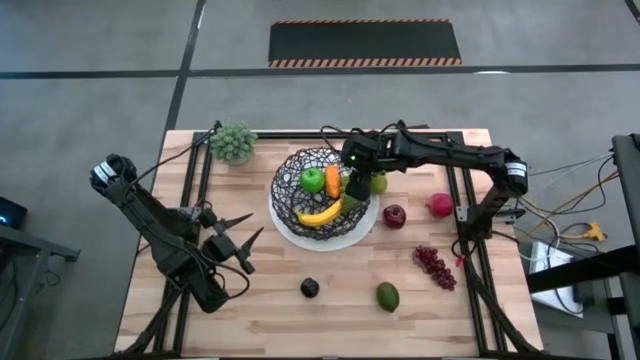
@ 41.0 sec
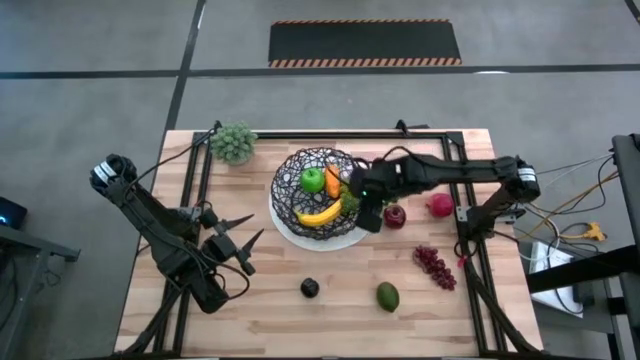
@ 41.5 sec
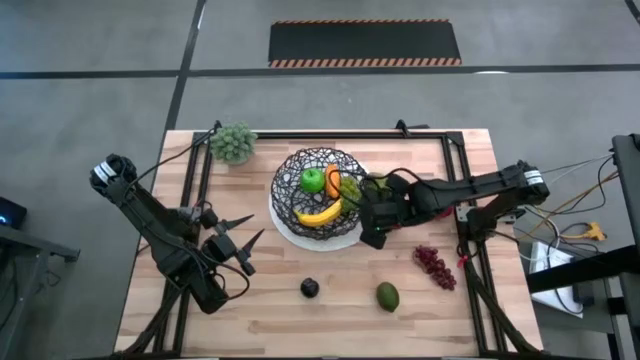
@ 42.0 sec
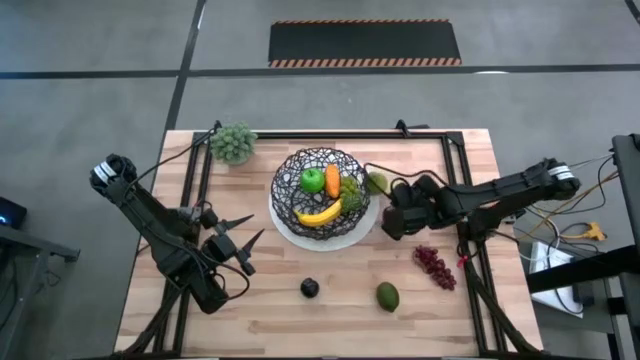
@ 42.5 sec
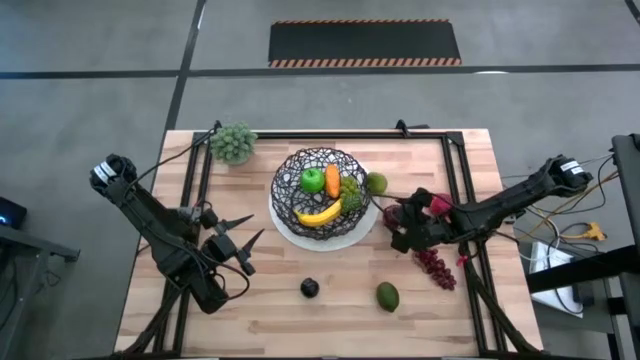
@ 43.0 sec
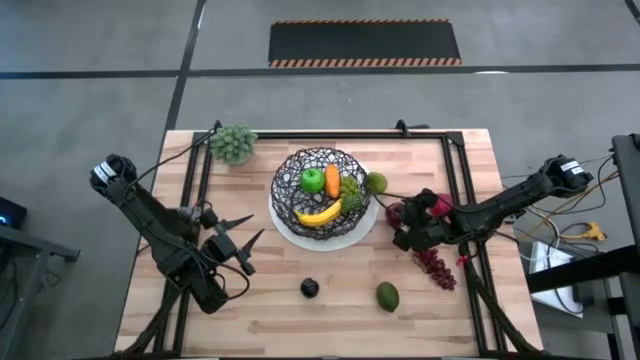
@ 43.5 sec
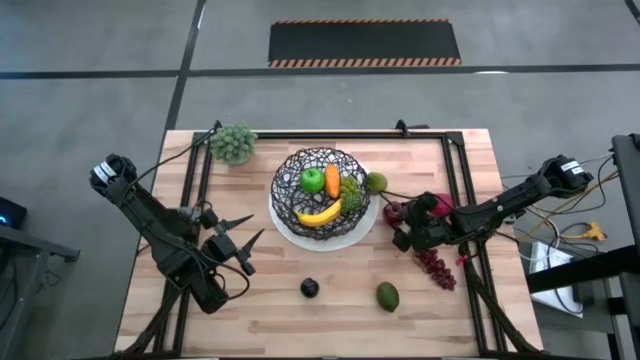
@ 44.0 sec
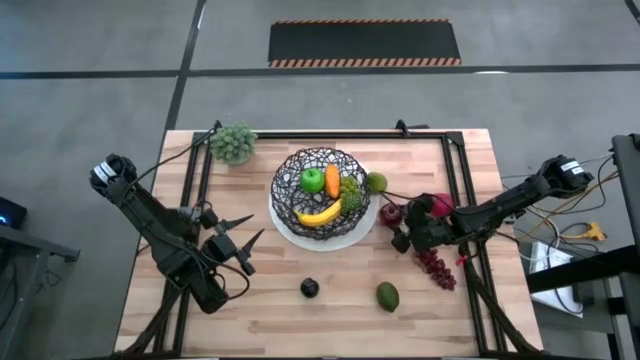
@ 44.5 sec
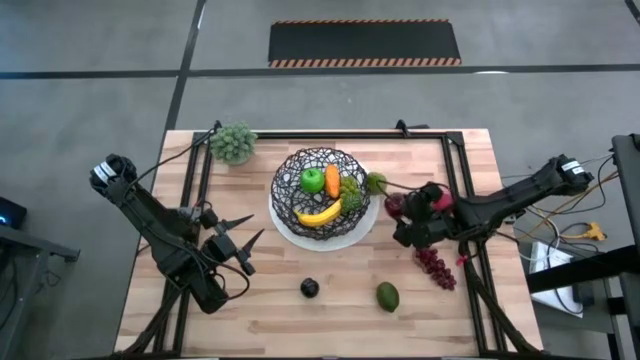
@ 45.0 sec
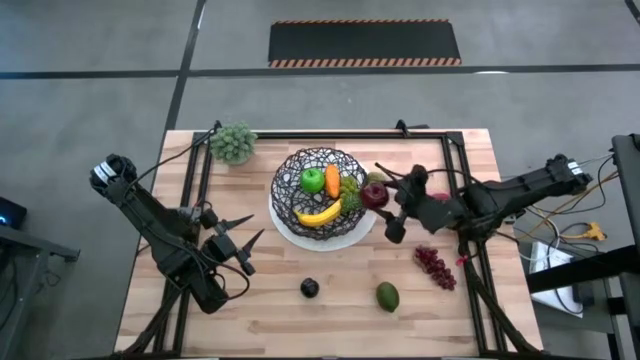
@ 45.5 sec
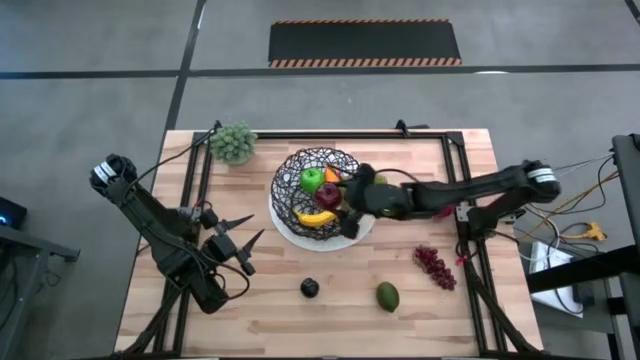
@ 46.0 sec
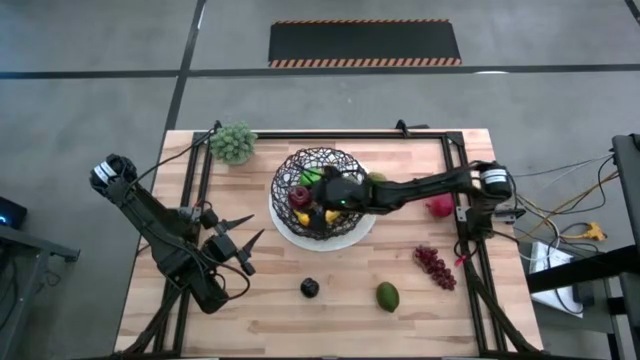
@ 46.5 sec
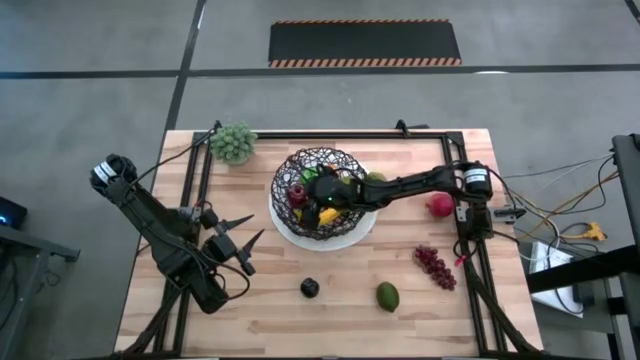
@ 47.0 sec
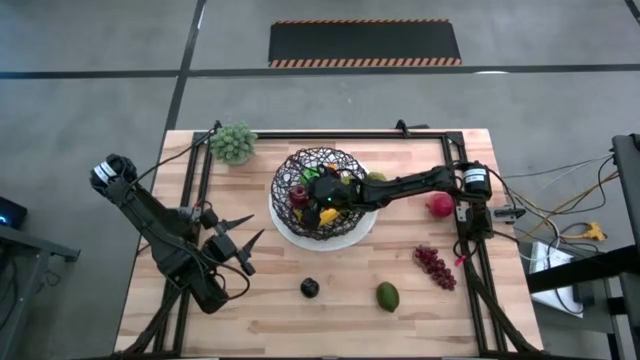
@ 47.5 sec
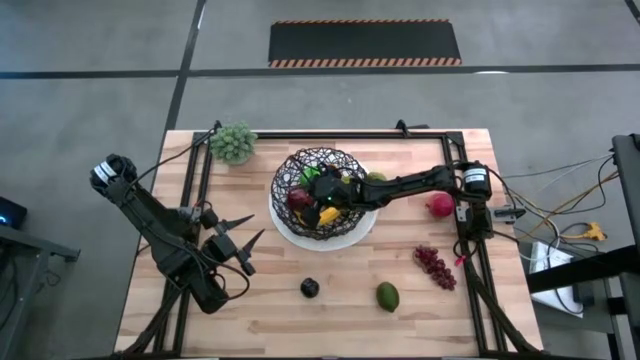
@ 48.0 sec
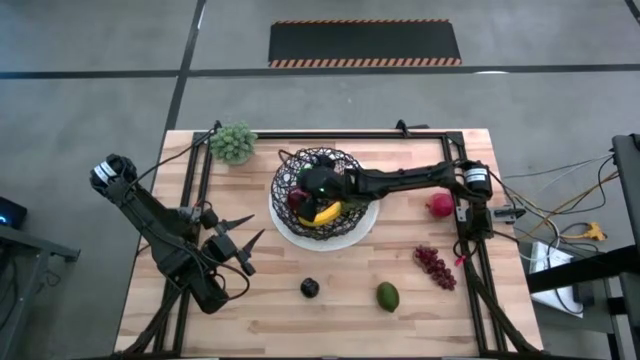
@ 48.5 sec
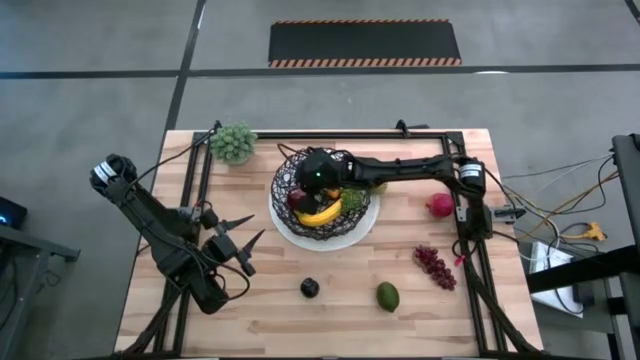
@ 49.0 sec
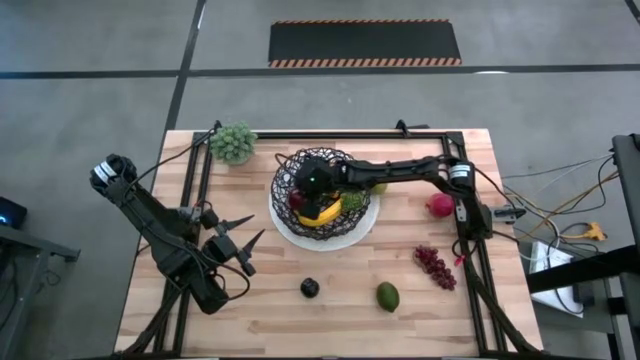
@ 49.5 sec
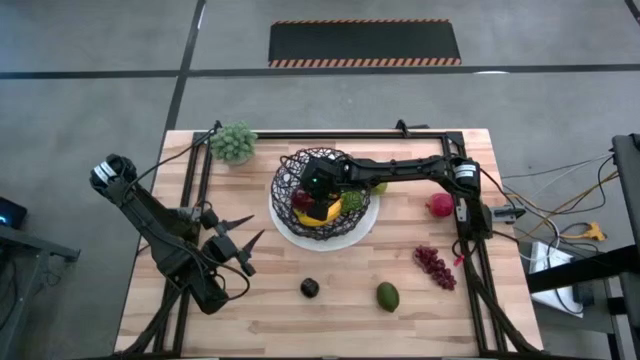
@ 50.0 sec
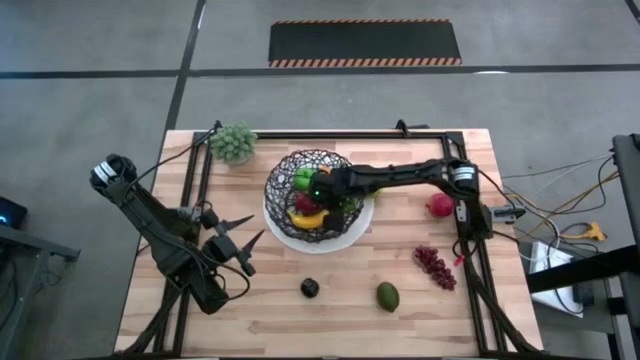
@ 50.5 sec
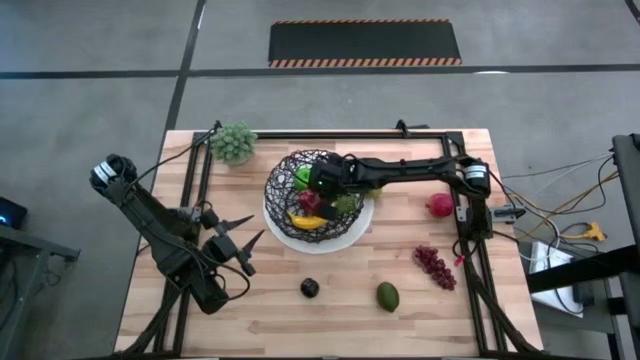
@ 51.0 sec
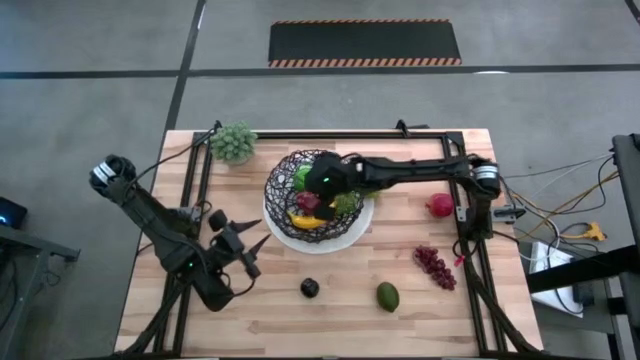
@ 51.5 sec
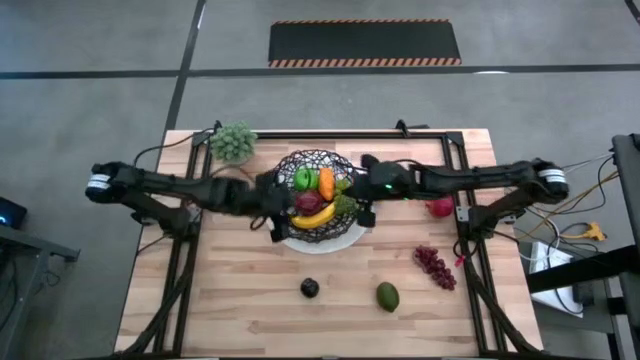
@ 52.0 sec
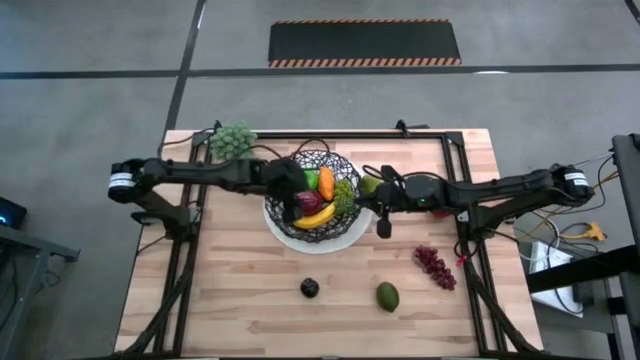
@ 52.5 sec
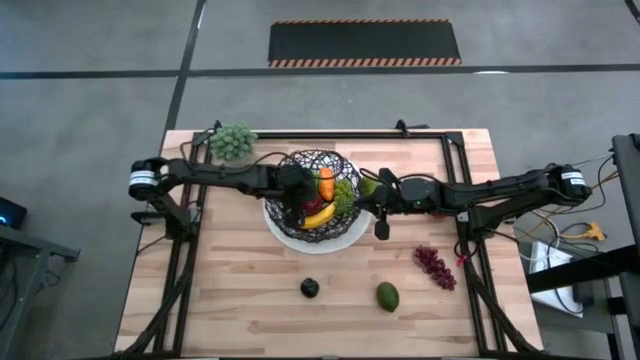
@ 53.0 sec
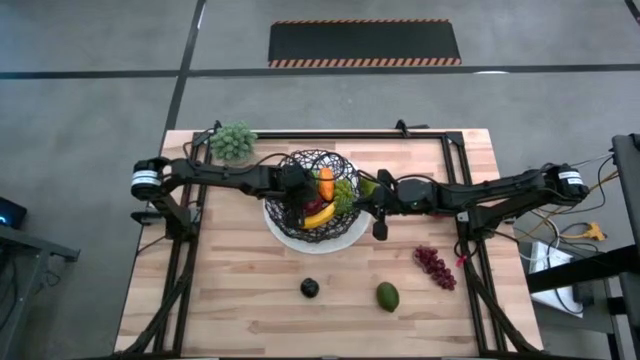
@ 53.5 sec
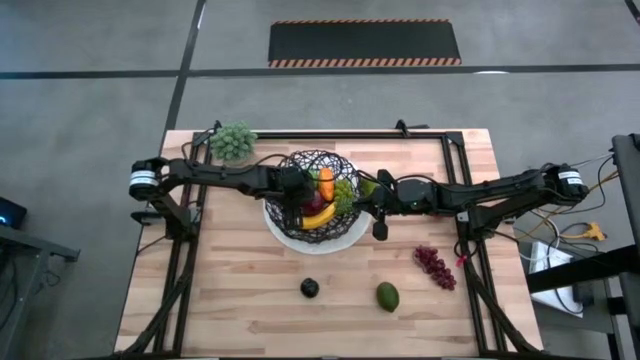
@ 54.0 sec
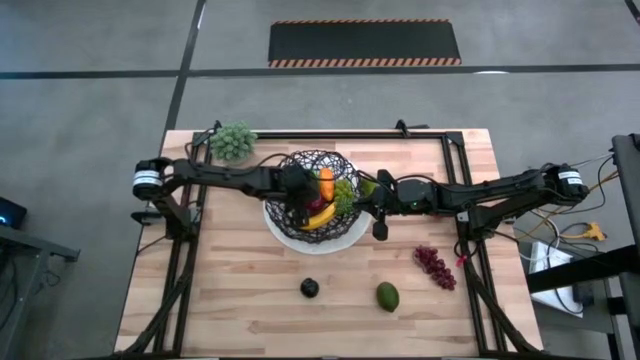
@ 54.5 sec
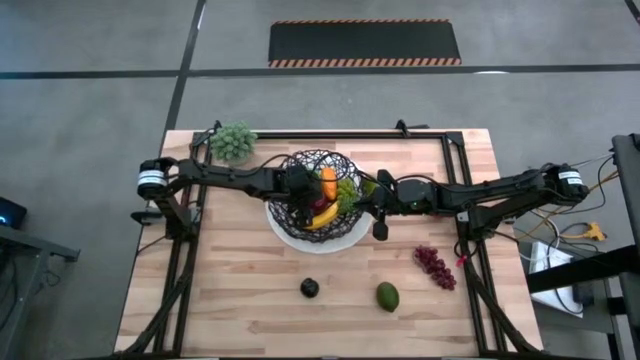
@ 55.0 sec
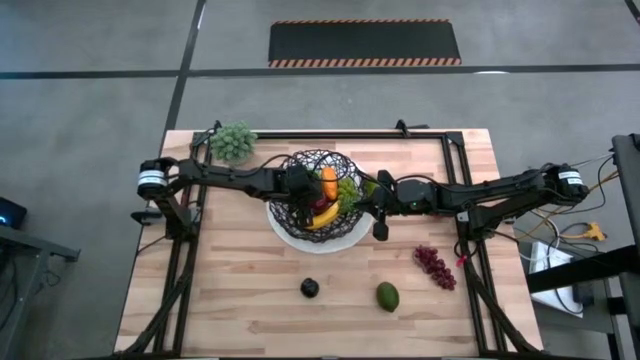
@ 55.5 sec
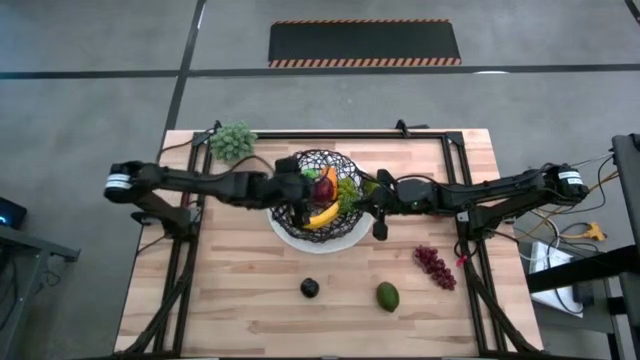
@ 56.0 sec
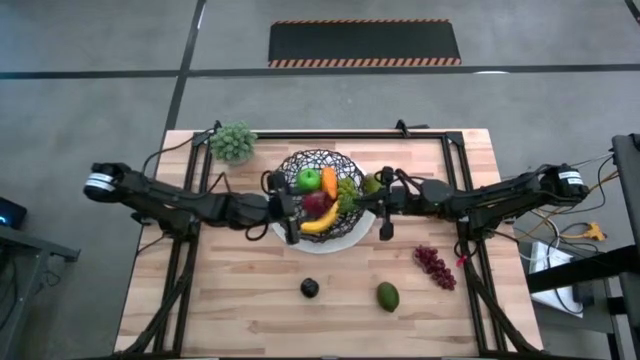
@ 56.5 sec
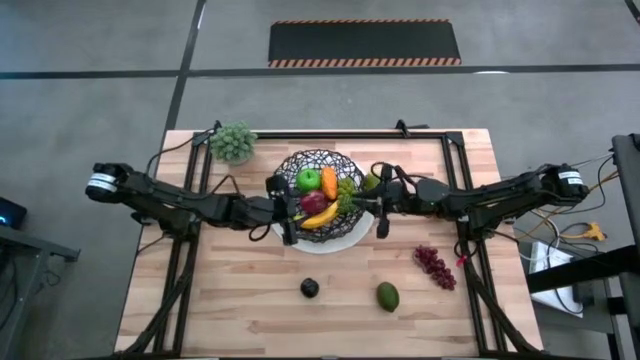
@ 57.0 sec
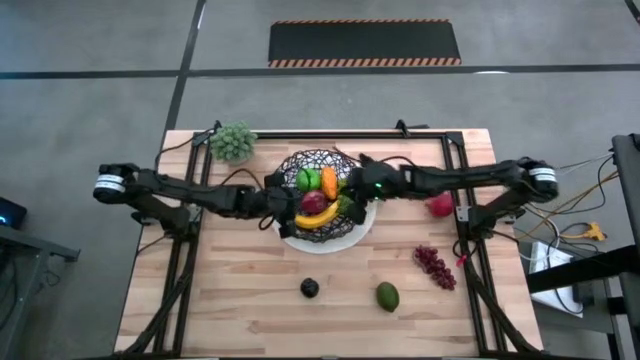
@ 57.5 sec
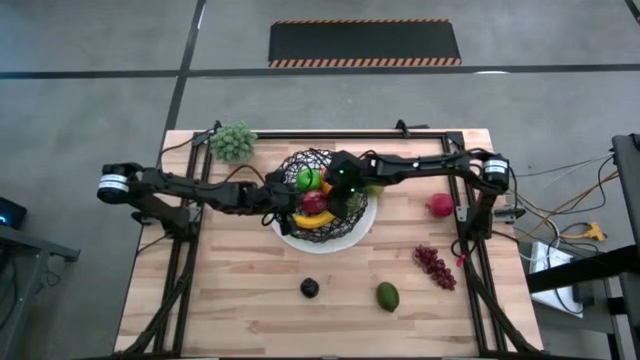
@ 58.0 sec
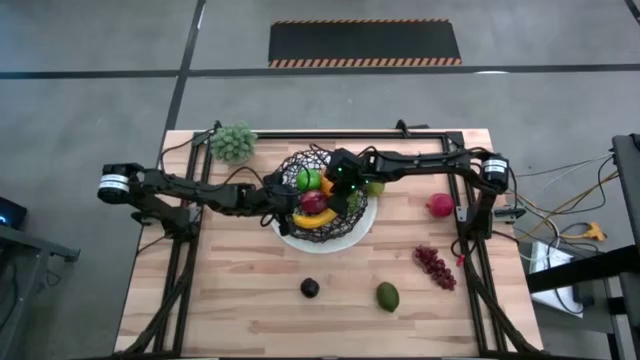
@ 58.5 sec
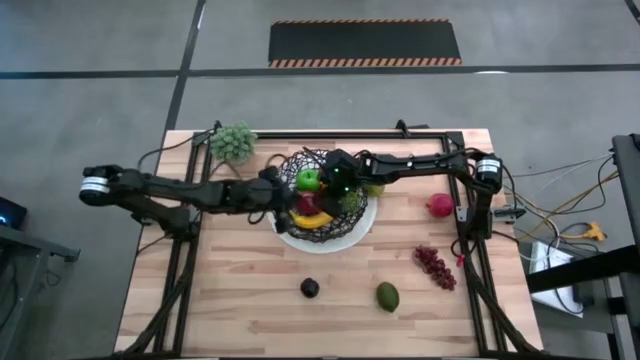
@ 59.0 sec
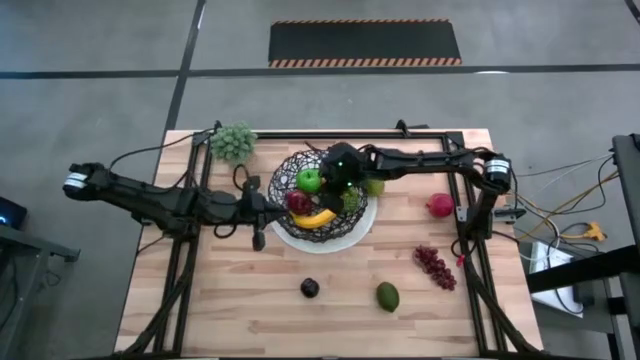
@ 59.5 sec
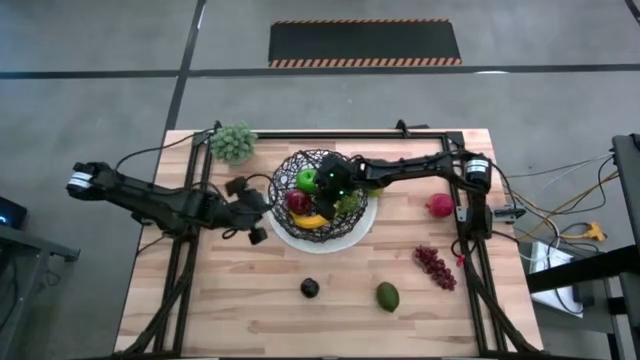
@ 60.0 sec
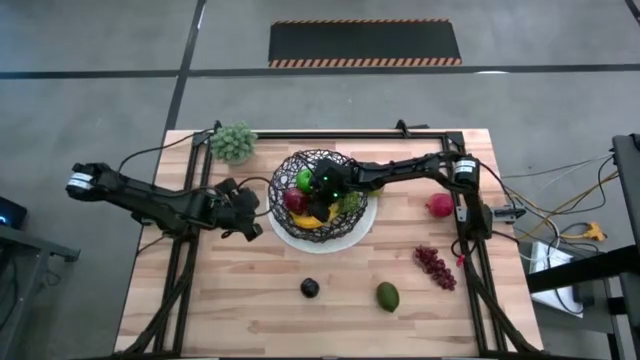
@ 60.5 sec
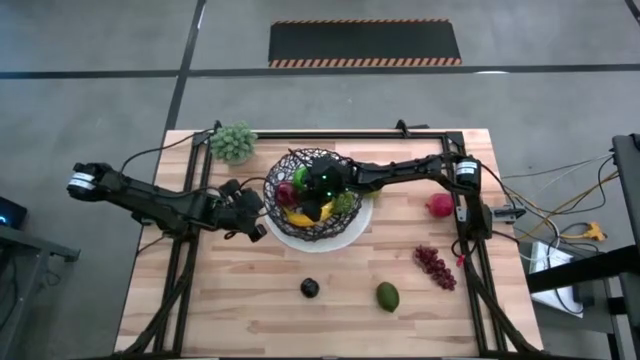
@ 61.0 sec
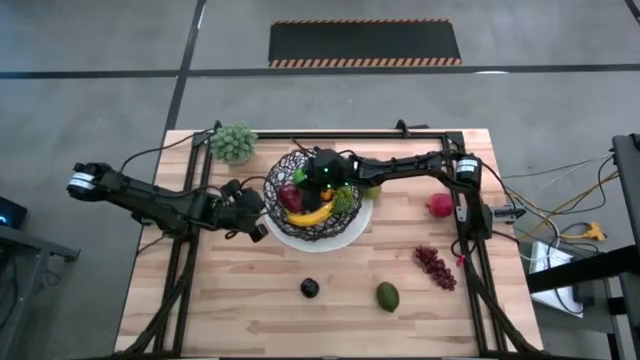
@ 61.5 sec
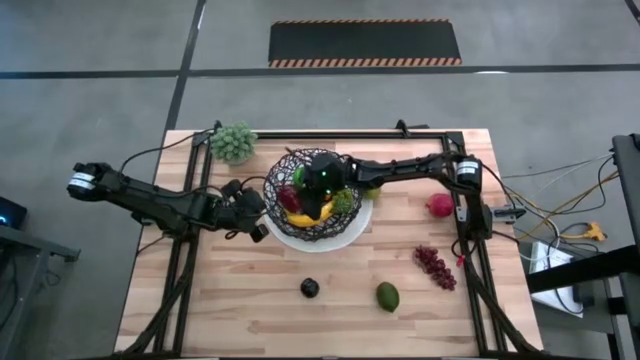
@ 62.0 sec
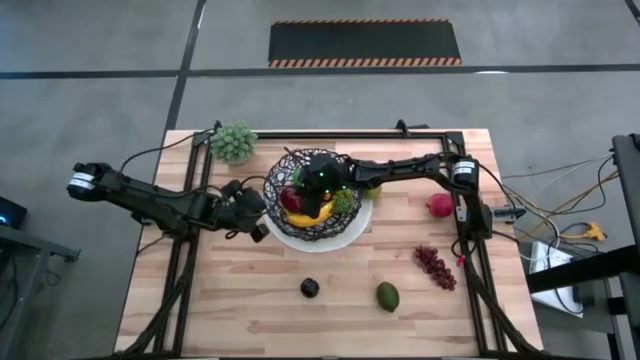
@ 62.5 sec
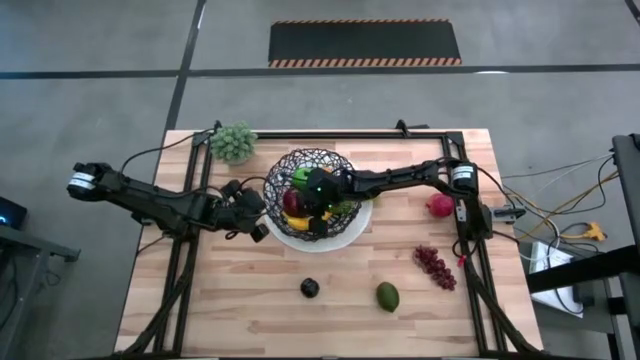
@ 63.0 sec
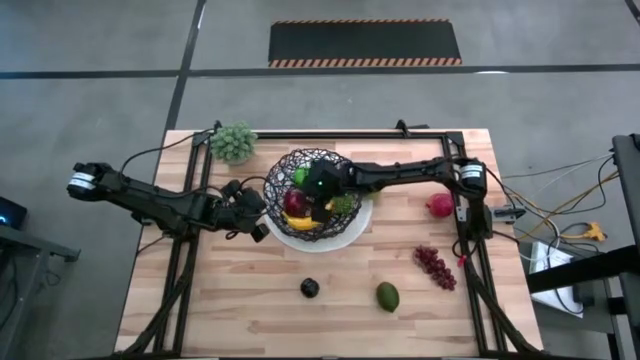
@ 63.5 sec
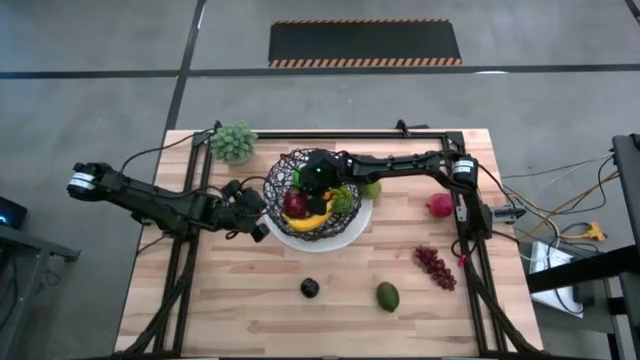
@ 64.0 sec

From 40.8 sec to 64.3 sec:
Task: Build produce basket
Put the red apple into the wire basket
